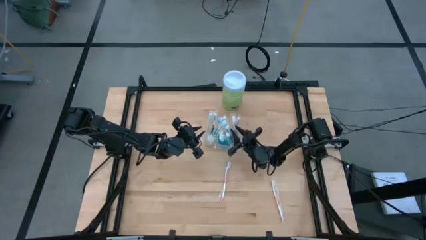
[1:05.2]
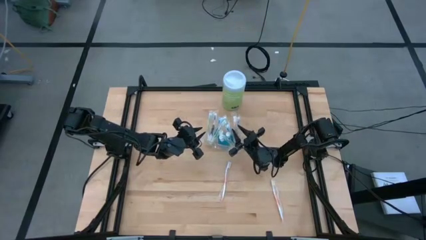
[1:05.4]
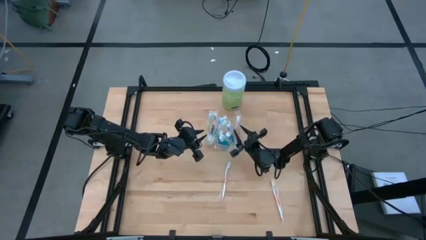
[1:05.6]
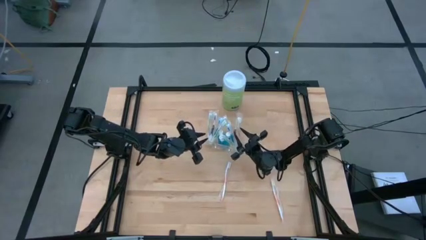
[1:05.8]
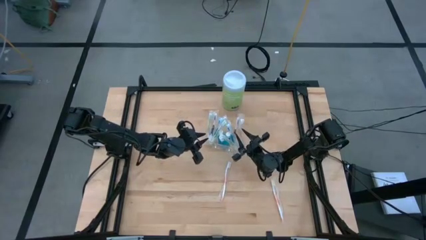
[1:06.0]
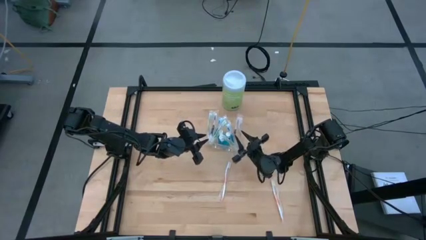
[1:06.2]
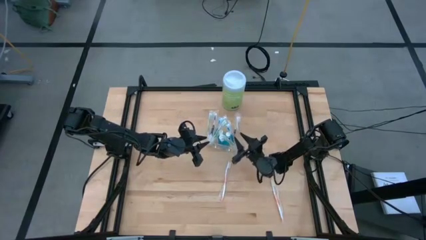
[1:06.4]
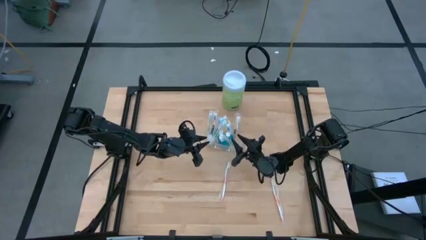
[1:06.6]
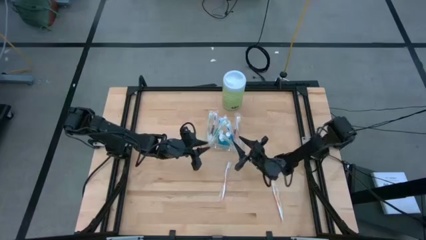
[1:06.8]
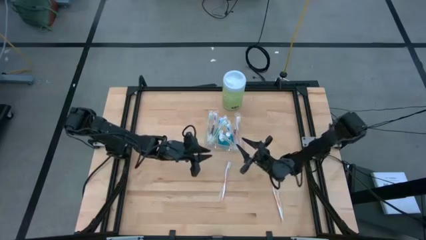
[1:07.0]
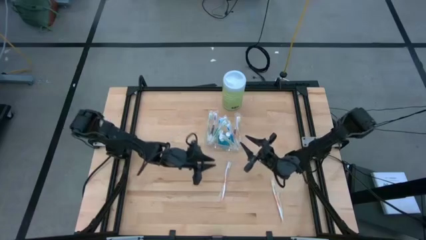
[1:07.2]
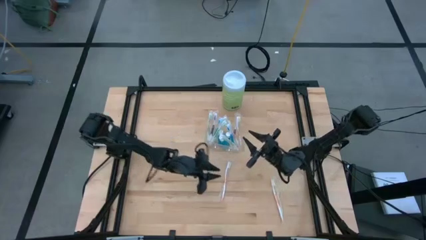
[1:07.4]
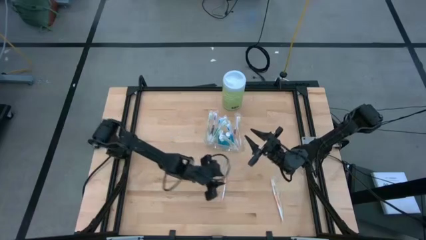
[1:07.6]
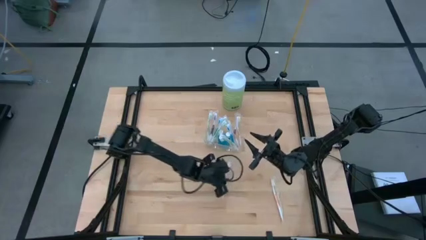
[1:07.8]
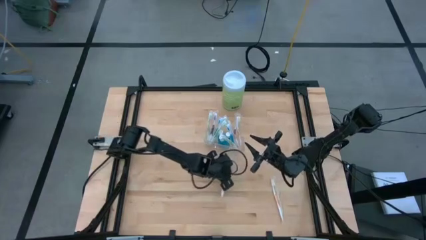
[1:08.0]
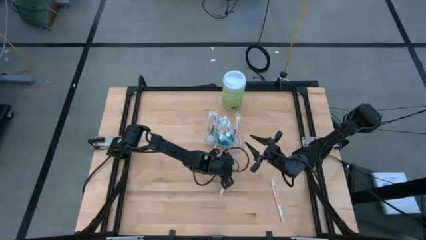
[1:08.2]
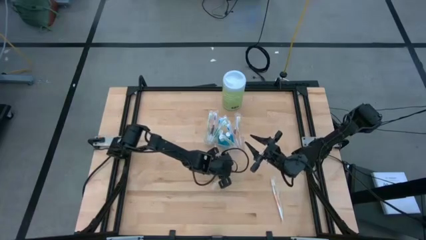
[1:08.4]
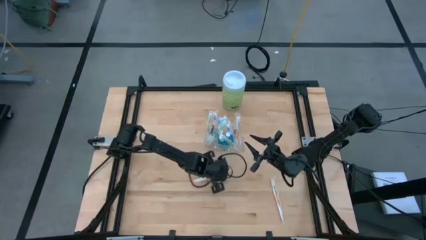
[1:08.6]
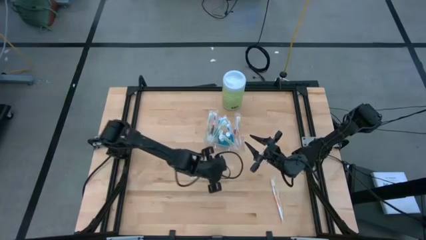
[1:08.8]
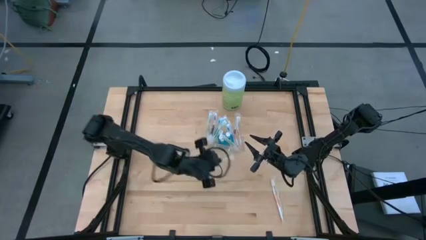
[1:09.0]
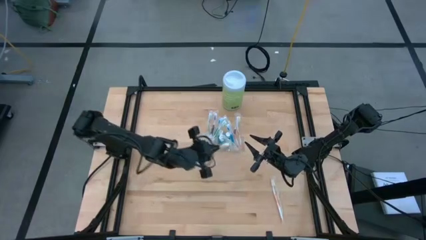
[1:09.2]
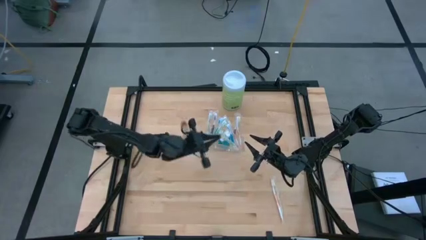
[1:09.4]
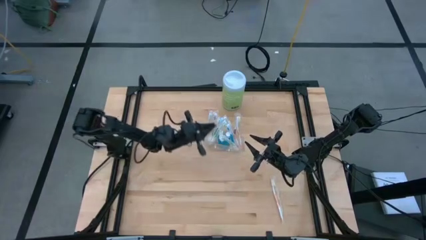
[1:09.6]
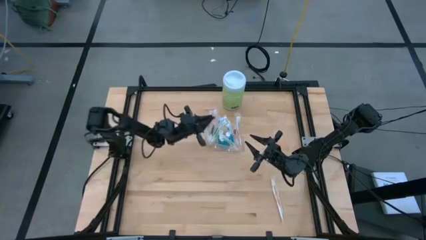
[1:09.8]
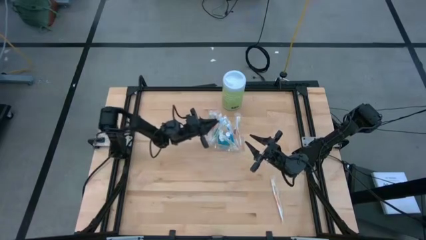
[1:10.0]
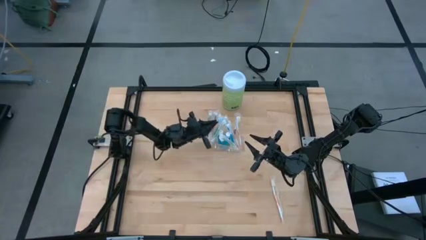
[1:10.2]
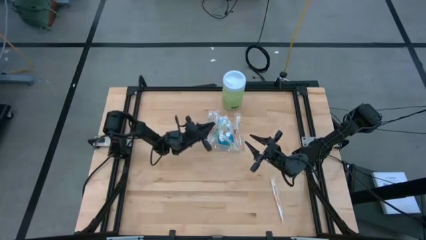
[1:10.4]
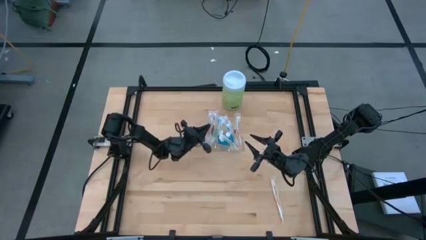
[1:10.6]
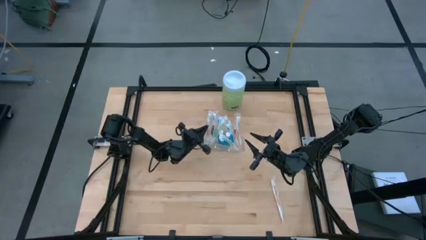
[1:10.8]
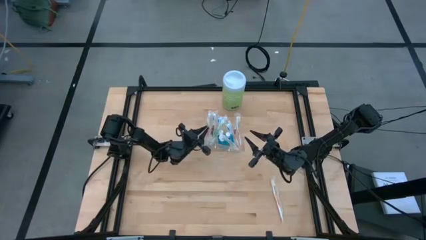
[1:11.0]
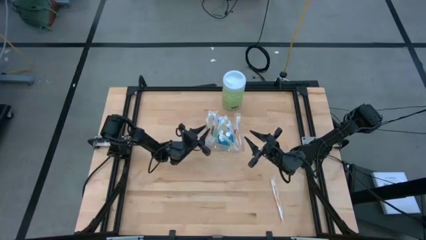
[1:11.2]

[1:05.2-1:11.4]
Task: Pick & Place toothbrushing station
Put the orange toothbrush into the transparent organizer

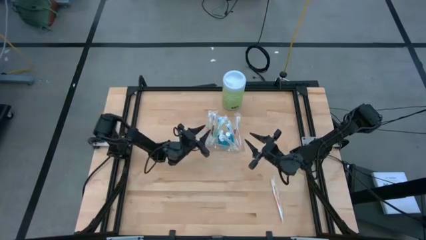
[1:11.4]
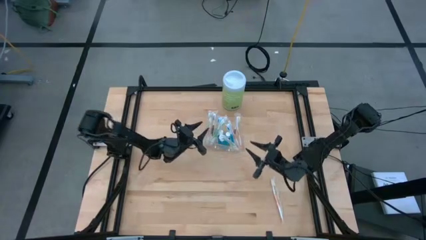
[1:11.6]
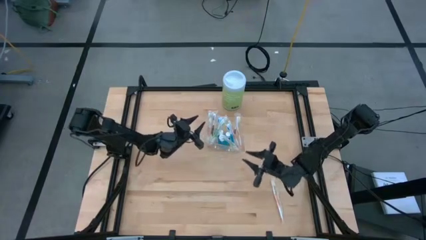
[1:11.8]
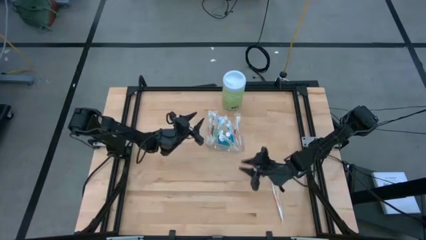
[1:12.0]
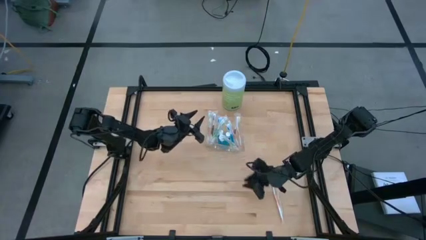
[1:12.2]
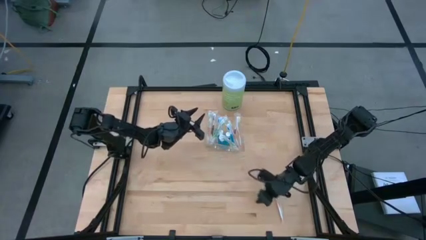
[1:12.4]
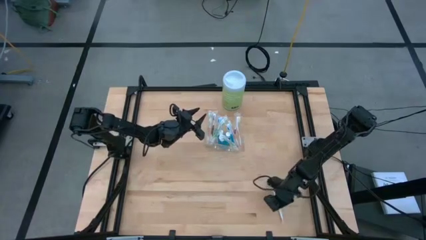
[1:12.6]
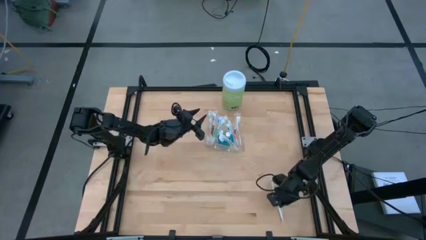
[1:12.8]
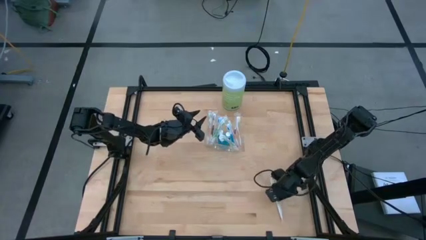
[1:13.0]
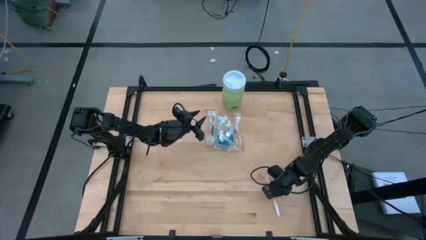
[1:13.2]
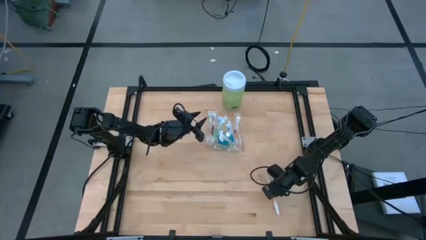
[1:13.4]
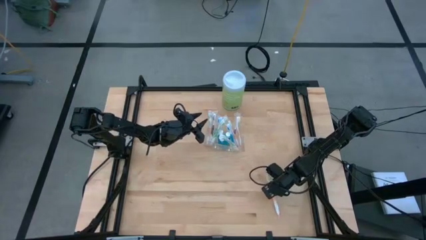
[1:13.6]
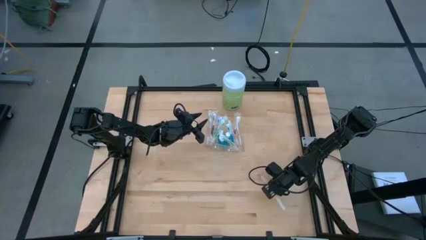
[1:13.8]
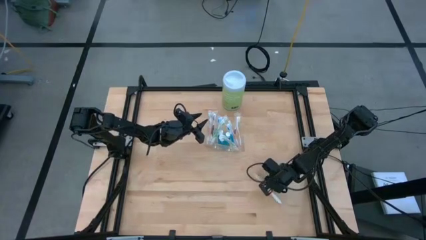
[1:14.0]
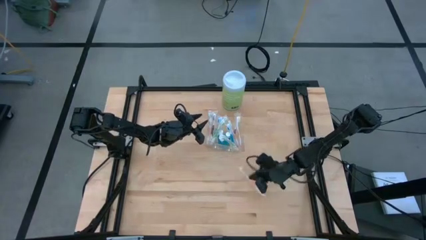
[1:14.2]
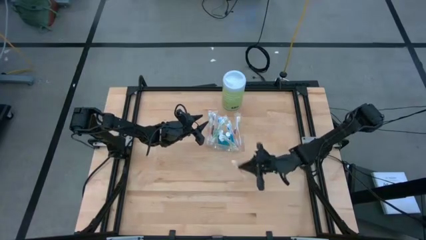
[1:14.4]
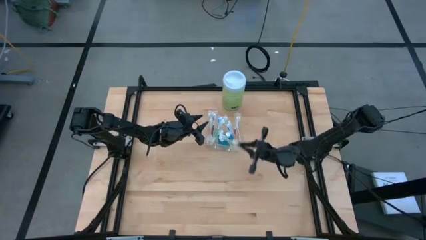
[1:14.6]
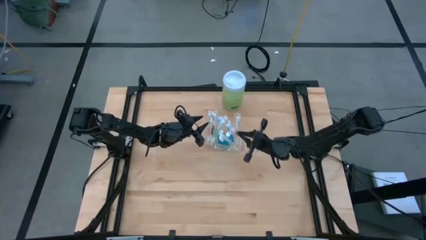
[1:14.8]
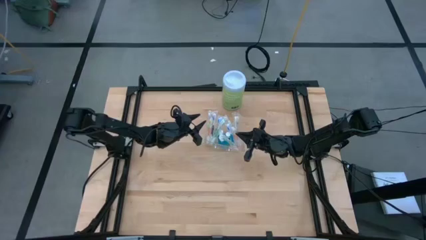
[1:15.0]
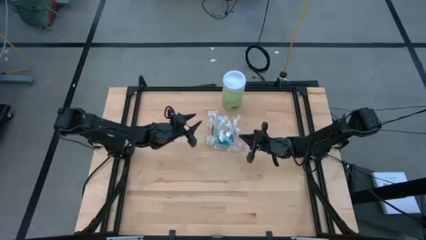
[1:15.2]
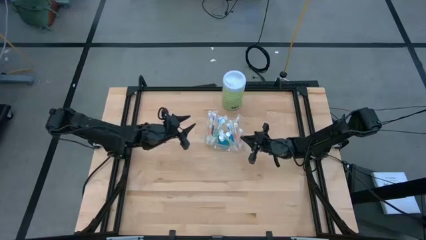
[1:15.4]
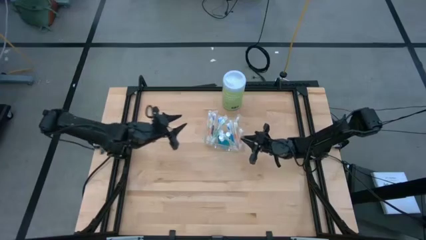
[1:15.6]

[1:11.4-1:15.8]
Put the orange toothbrush into the transparent organizer

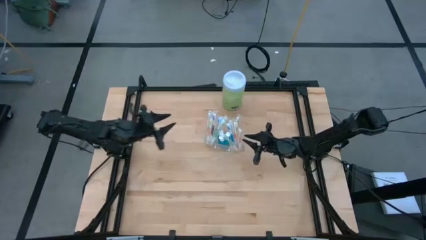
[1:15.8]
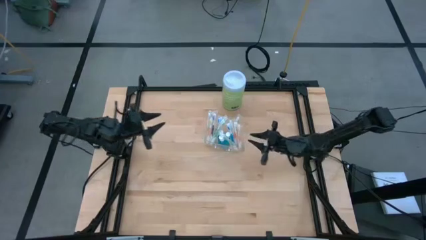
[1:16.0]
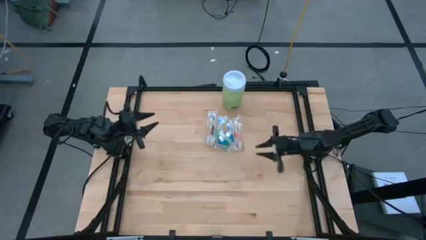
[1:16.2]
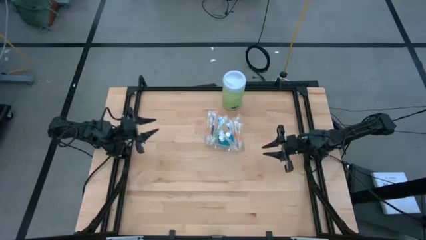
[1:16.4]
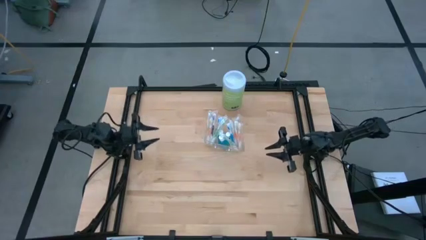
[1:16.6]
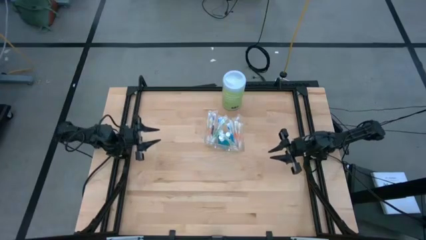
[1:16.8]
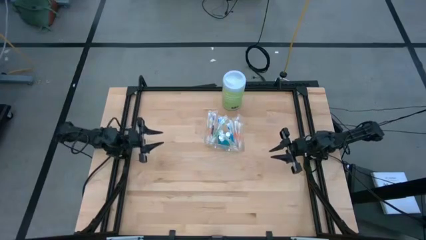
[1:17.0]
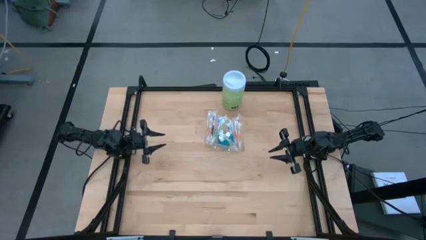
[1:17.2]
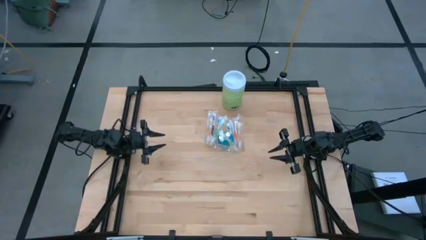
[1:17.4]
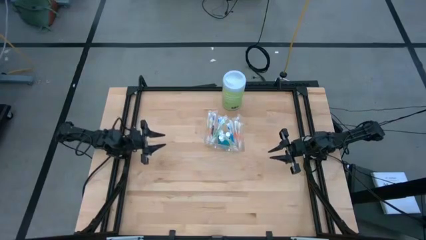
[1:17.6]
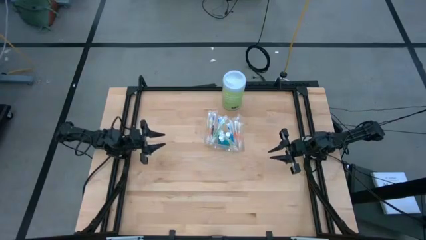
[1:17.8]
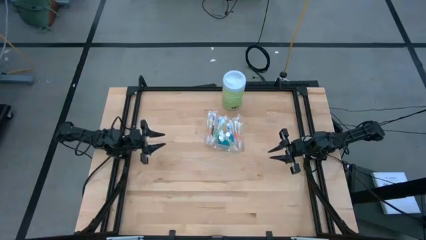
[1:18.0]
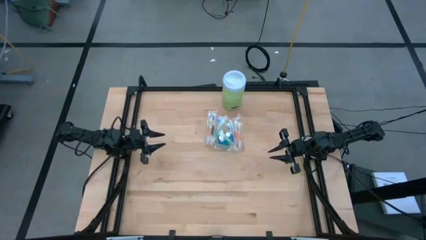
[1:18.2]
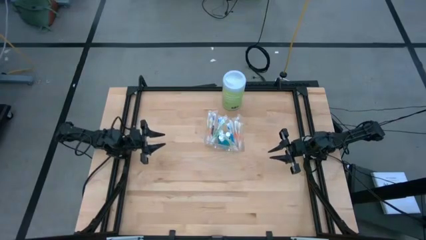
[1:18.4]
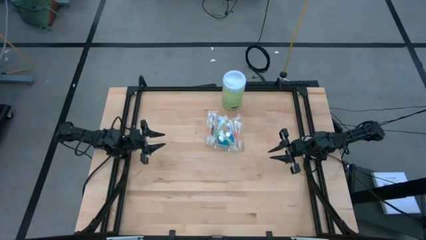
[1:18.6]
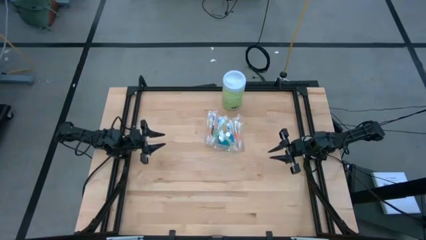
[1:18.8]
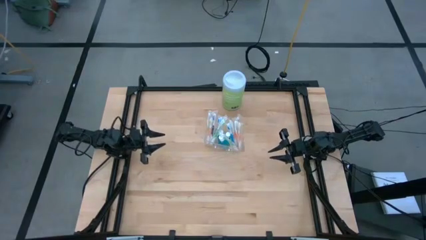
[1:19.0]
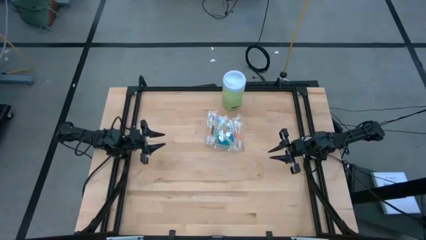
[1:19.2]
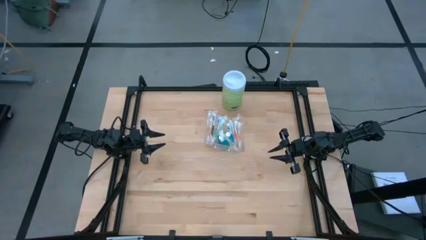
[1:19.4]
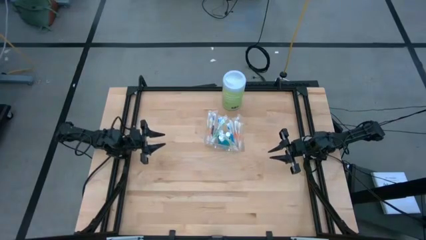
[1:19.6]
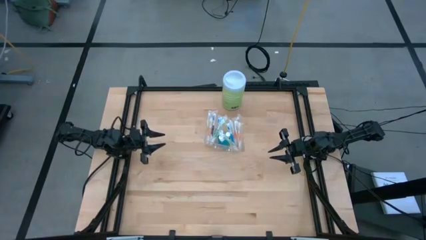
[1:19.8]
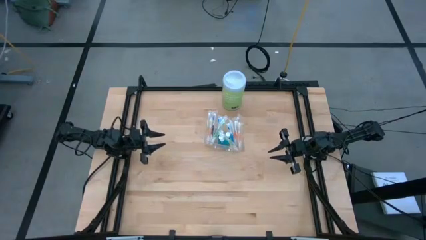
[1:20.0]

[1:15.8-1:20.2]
Return to Home Position

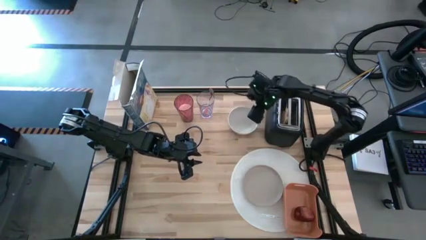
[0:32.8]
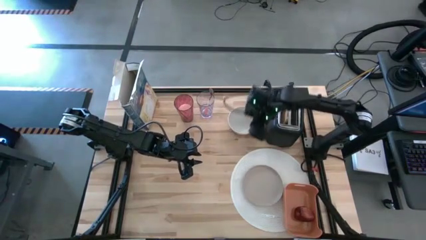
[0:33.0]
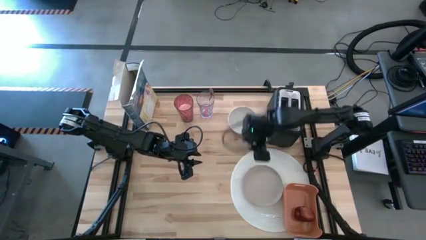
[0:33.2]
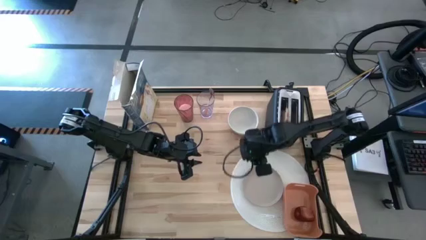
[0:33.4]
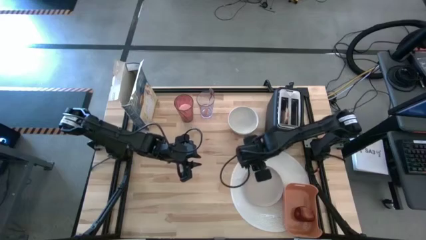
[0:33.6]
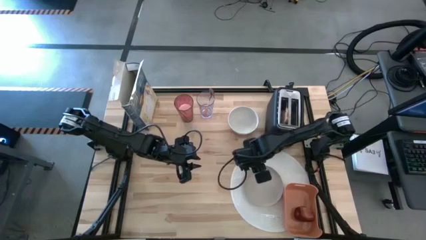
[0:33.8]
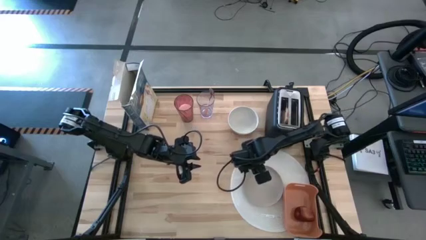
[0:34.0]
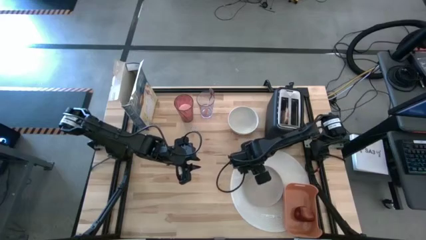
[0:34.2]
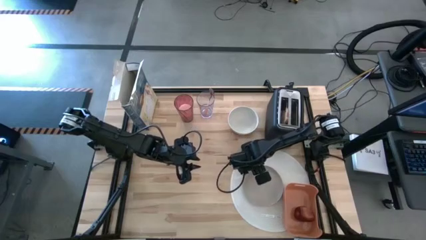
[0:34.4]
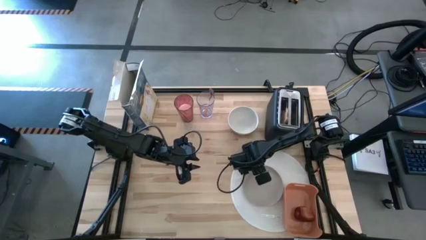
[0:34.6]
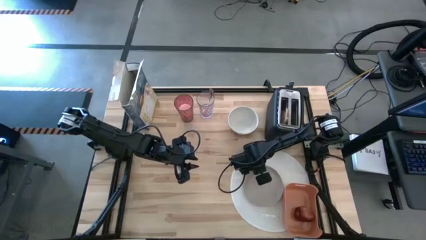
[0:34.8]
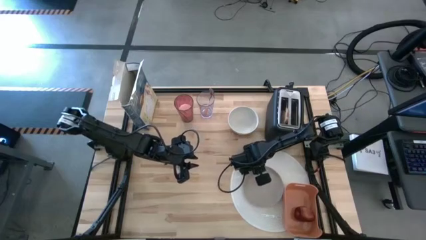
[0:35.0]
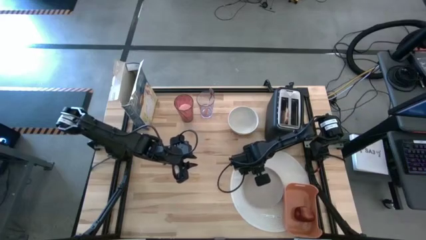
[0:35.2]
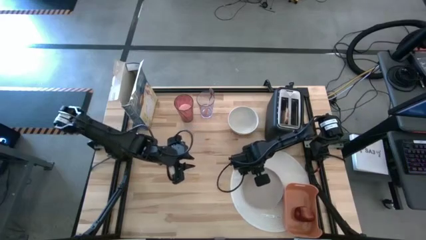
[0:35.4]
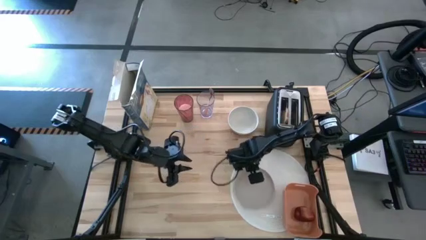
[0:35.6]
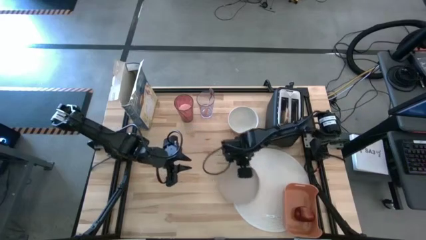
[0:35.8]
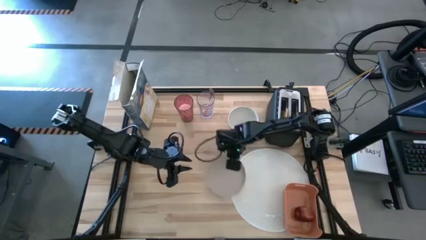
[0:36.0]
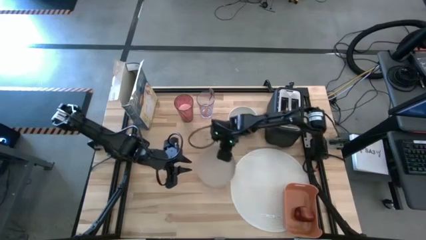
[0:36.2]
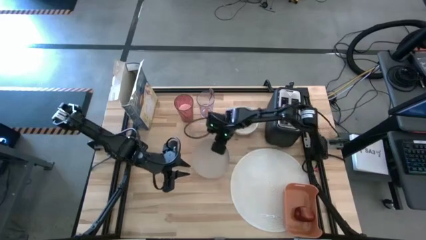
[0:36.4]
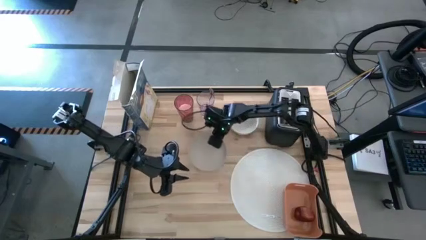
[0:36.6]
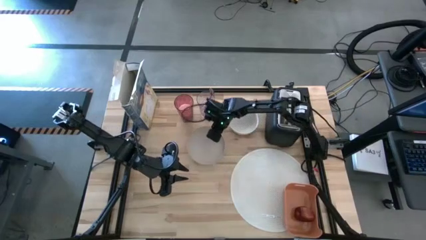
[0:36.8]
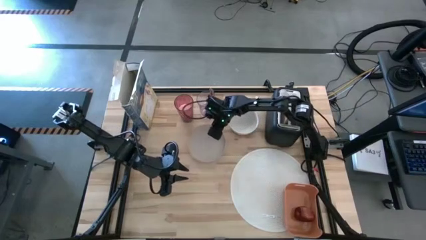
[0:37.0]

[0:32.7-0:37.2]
Task: Arrange a breakfast setting
Remove the peach plate from the white placemat and place it on top
